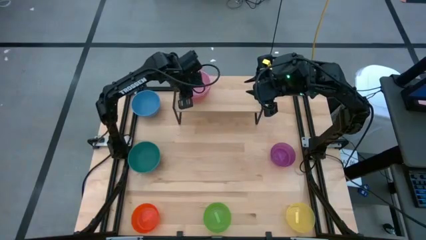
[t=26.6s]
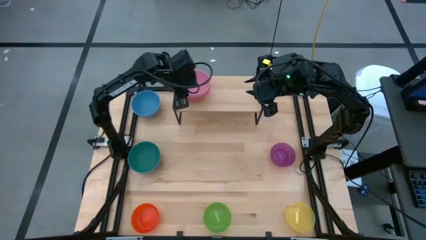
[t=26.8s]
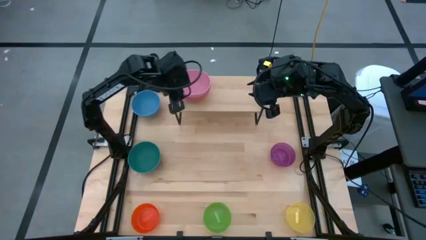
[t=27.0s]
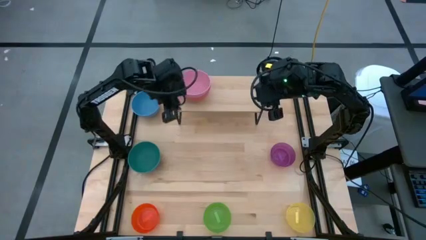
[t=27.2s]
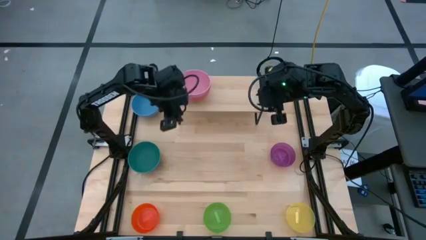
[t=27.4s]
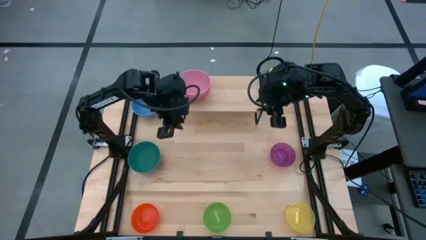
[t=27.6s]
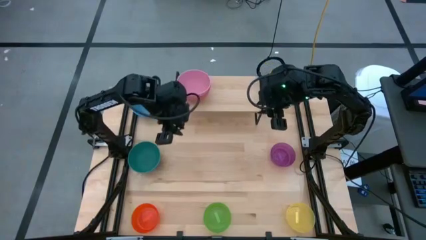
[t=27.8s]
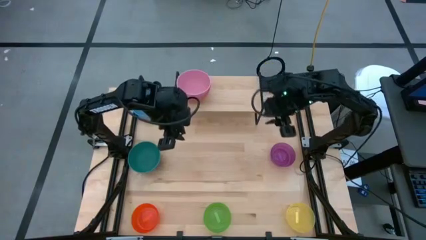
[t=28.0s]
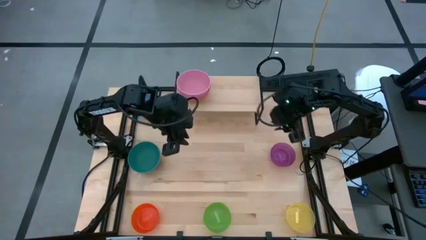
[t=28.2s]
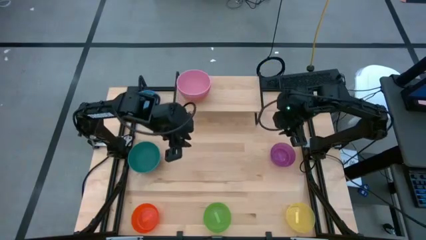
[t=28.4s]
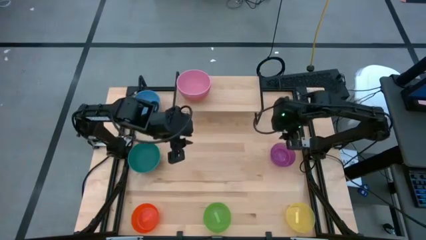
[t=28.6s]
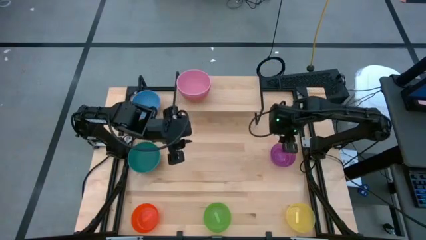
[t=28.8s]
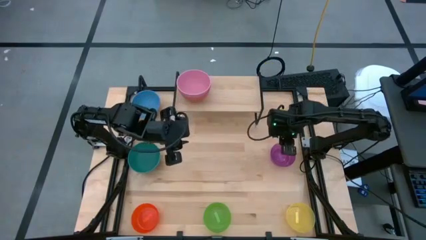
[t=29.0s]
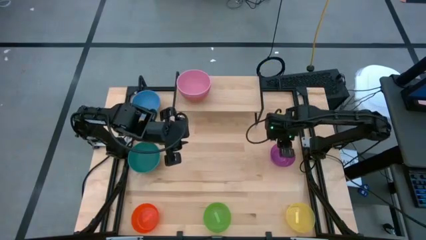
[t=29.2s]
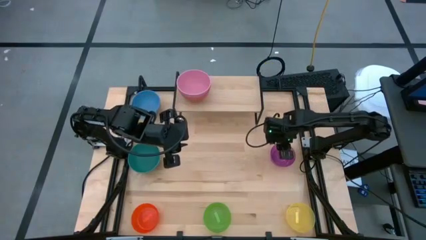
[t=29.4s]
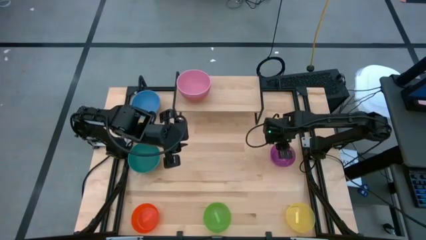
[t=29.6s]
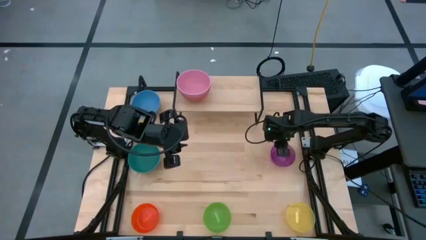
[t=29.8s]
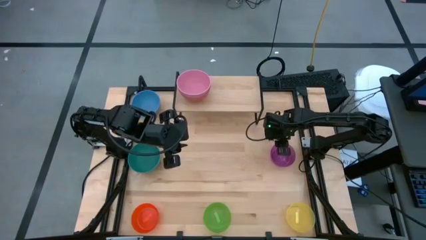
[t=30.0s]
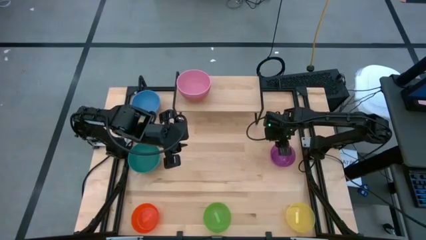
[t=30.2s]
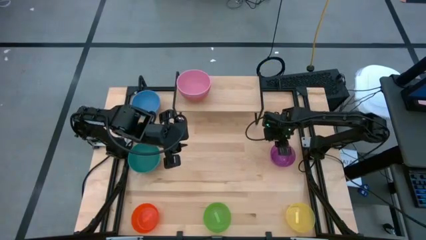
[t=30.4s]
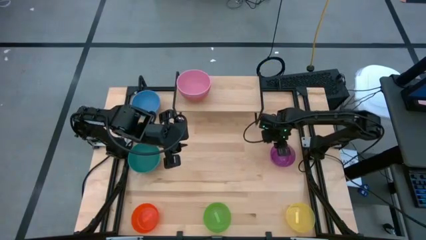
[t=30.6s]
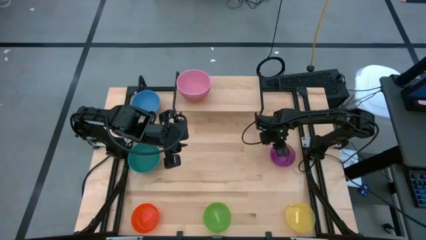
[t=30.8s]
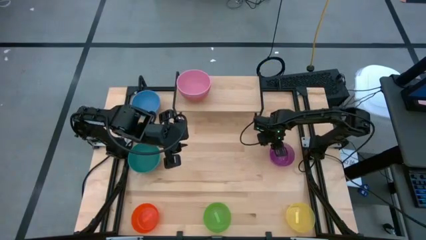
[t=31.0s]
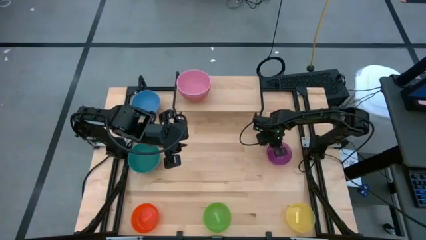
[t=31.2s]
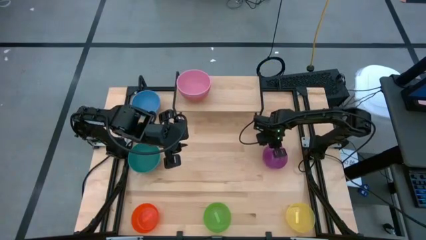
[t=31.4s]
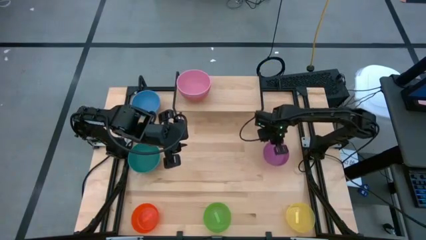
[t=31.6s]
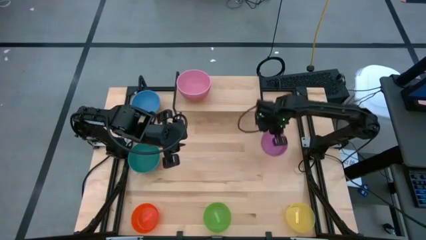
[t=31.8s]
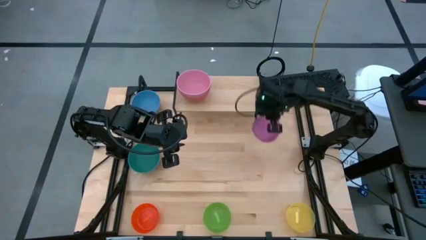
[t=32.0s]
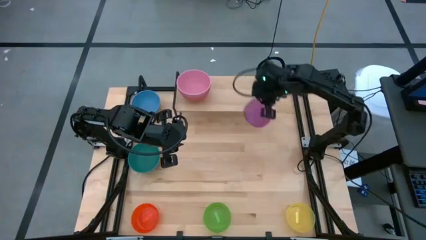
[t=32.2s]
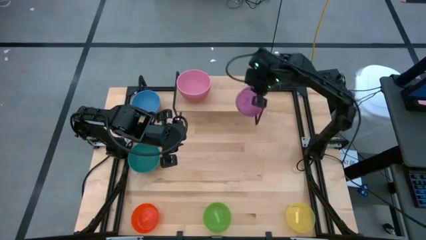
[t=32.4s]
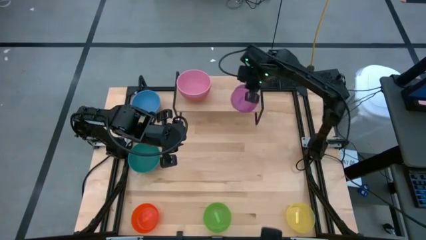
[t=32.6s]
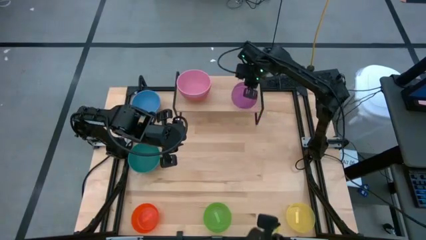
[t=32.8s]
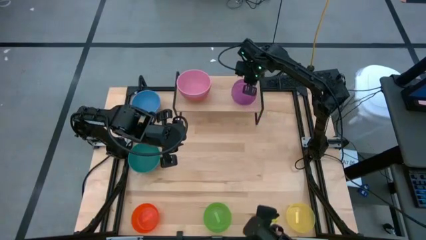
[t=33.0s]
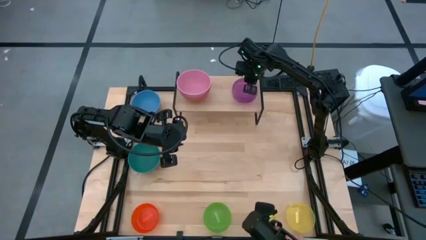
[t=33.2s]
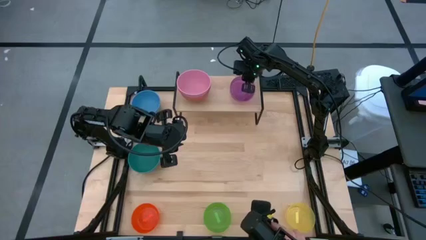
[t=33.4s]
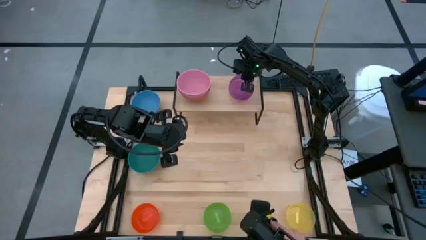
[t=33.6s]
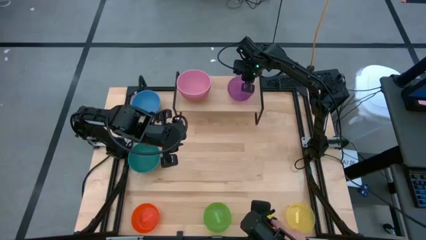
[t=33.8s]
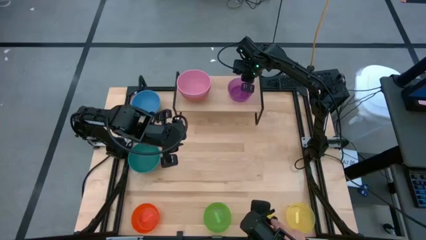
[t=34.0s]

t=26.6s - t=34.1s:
Task: Place and stack bowls onto a shelf
Put the purple bowl on the shelf

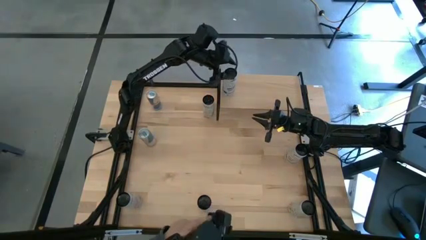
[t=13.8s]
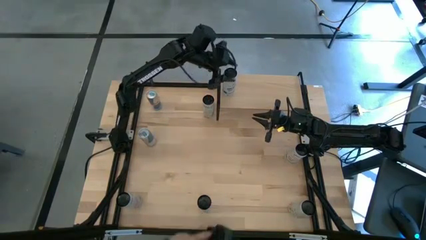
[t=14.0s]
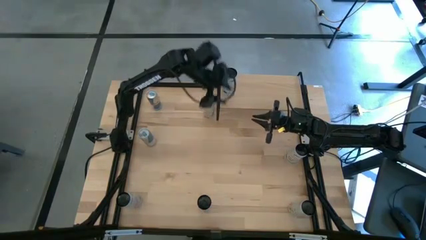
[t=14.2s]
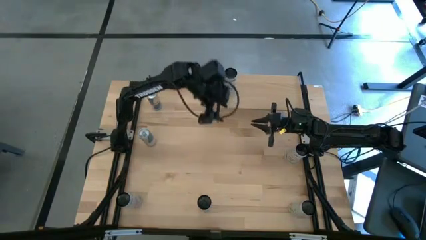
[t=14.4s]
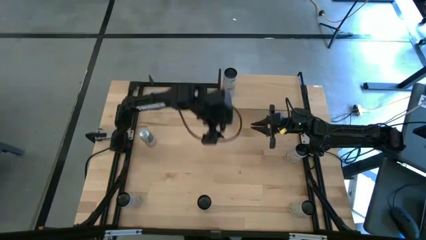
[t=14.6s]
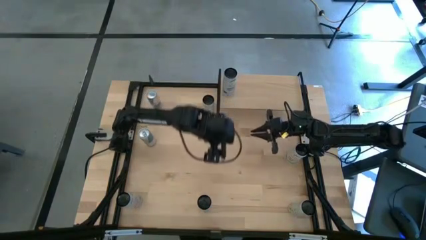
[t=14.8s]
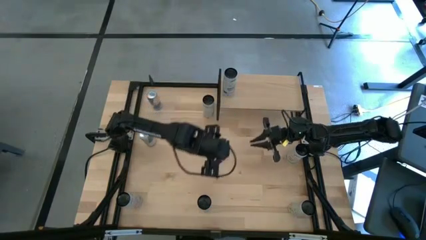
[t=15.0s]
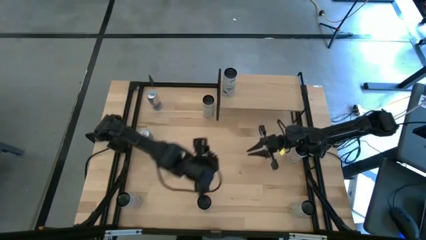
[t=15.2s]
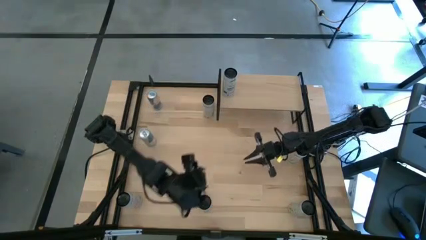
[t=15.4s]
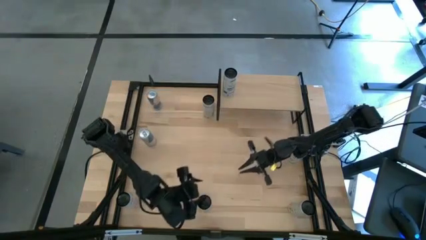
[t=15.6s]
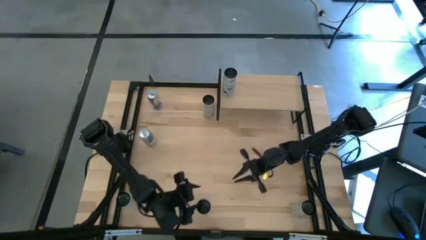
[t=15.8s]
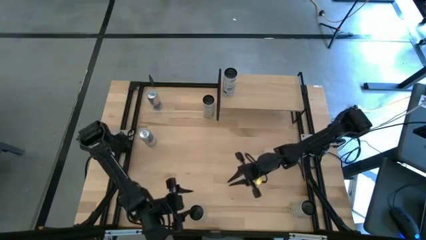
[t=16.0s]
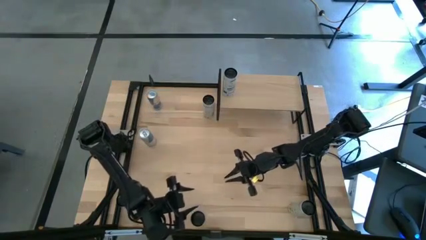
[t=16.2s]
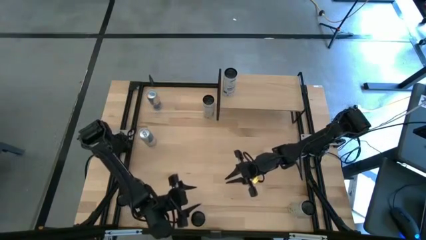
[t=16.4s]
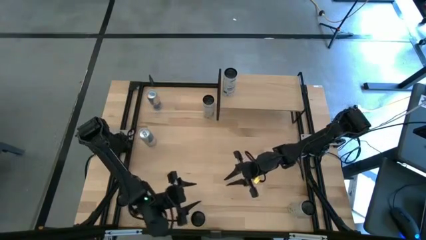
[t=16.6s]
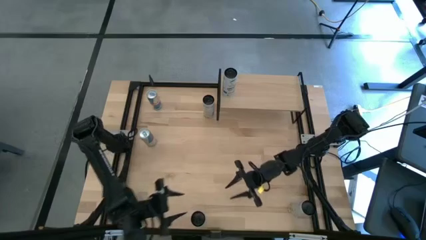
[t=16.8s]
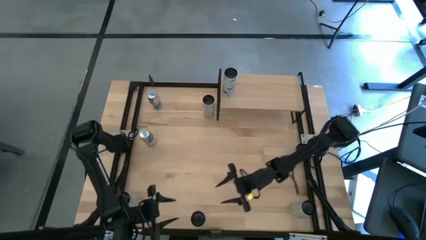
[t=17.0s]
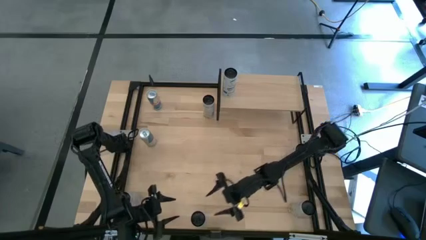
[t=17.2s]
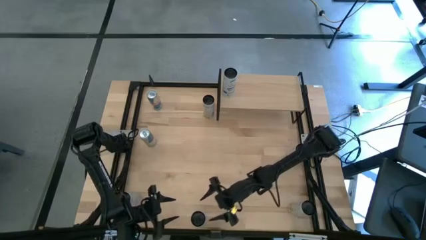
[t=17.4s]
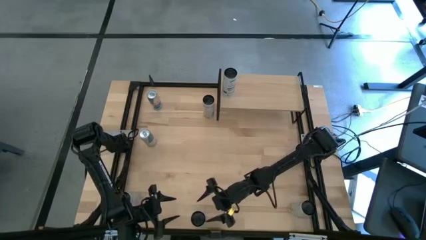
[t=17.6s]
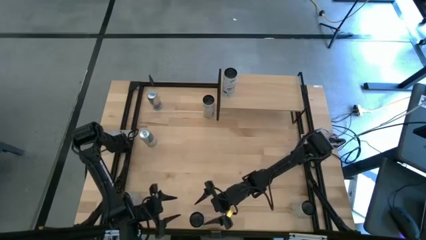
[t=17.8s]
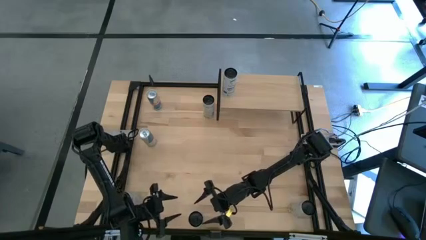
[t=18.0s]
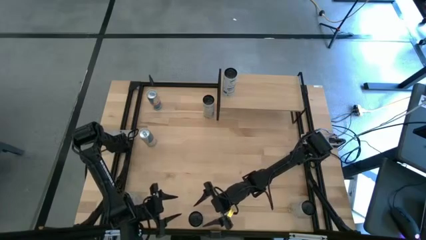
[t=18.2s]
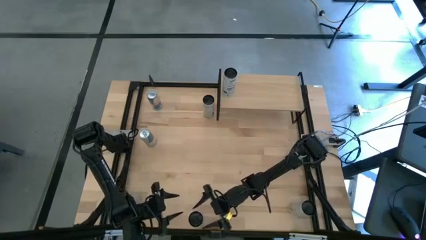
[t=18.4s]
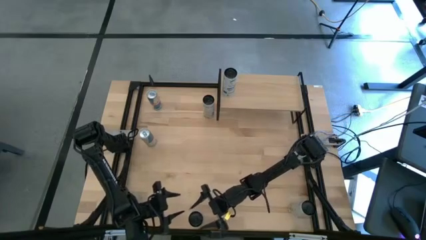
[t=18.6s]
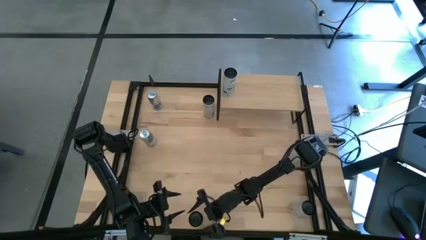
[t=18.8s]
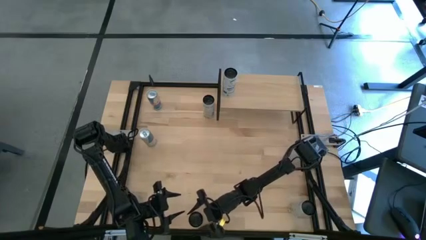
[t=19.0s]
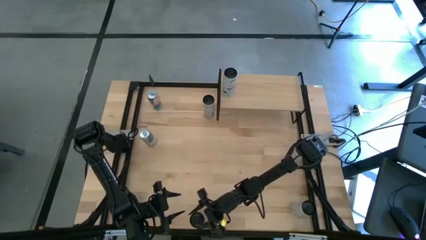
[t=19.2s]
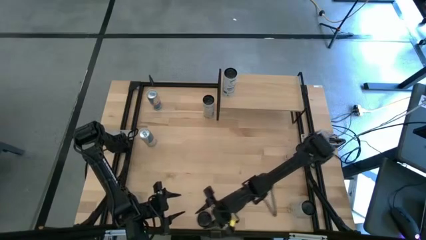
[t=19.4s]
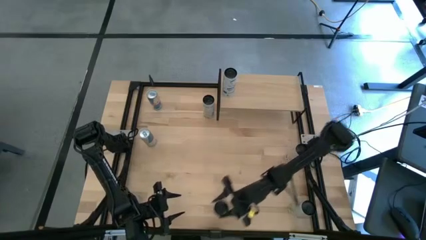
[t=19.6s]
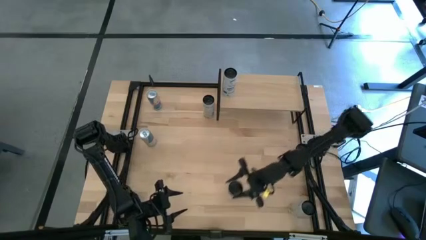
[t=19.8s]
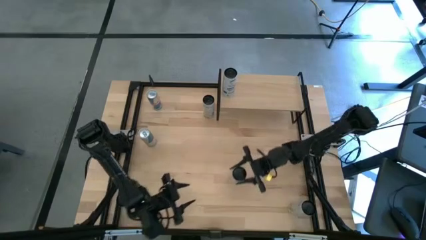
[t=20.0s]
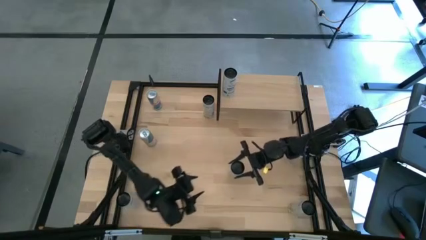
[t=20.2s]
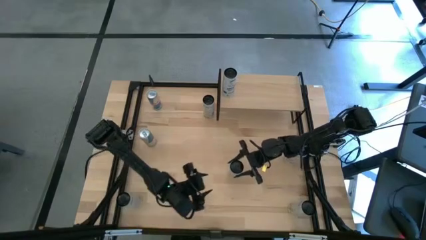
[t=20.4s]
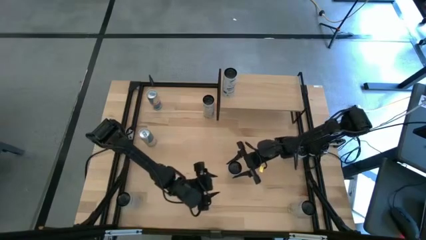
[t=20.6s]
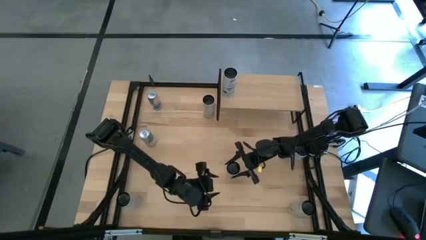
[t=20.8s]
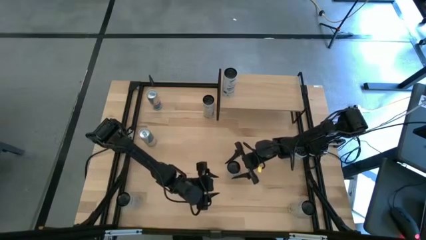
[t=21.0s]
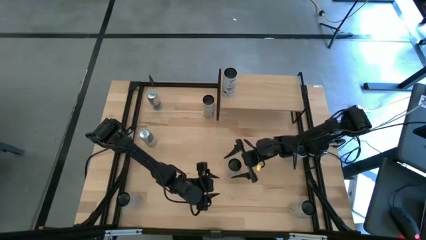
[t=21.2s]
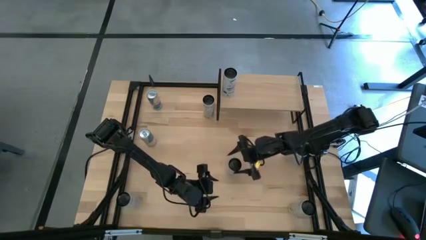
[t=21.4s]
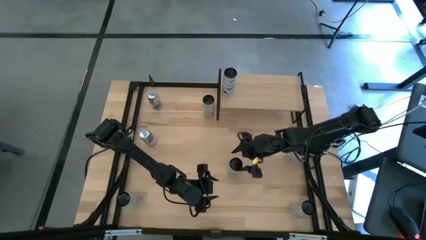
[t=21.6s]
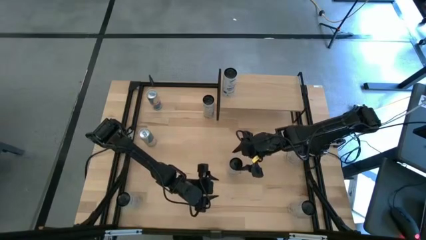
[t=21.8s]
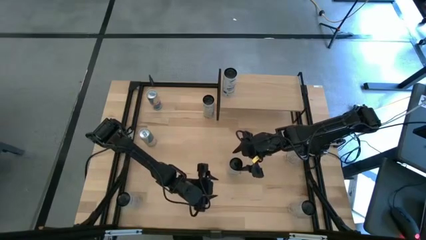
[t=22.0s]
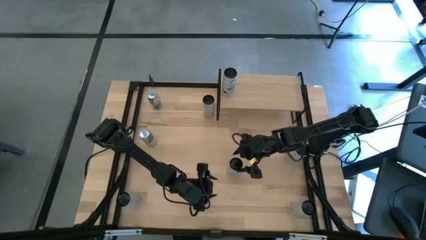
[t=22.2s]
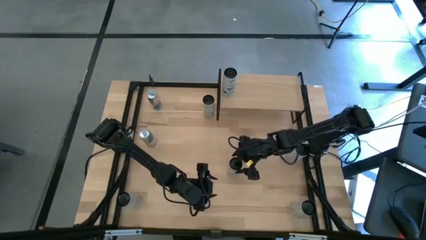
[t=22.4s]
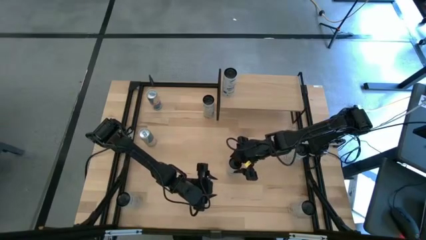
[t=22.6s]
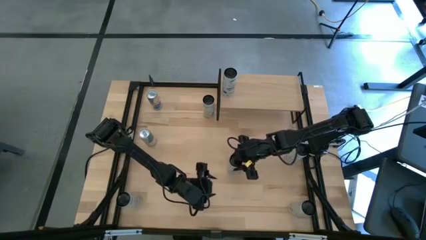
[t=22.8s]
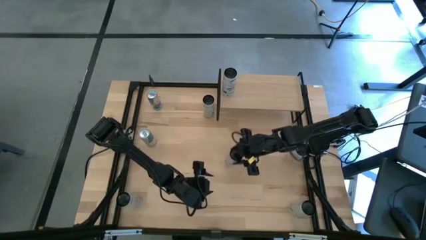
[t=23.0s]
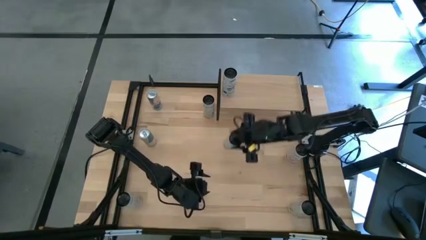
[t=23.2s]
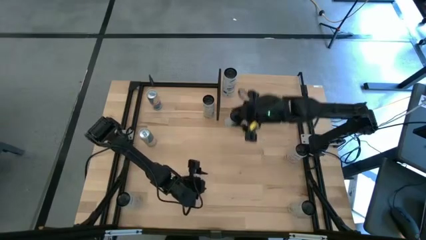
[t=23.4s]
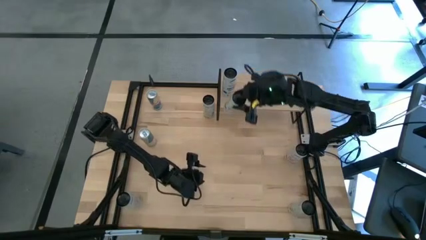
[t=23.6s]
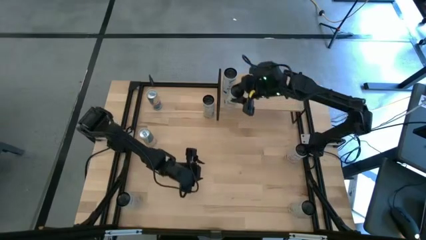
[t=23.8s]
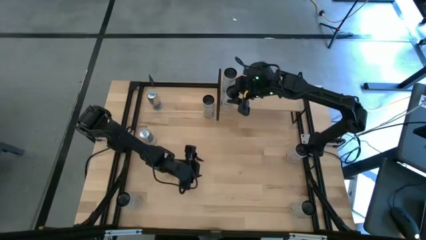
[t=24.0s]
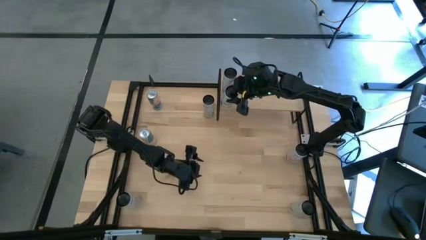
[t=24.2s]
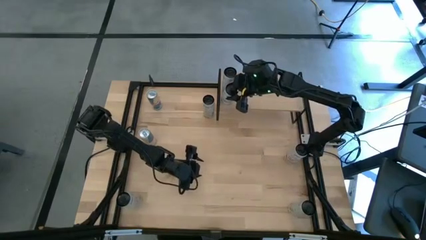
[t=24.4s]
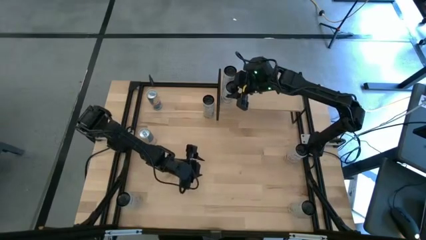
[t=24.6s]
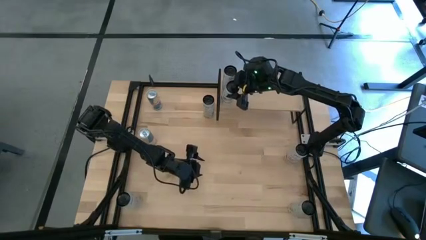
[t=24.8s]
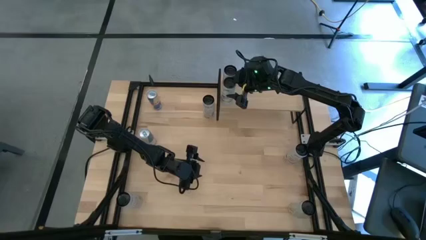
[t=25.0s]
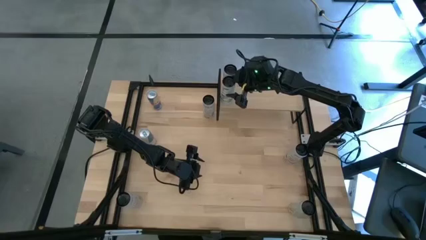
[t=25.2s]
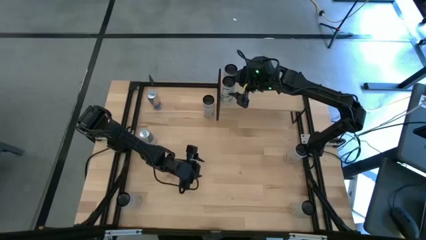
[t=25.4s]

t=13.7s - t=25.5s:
Task: Place canned beverage on shelf
Put the white blue soda can aligned with the other white blue soda can on the shelf
